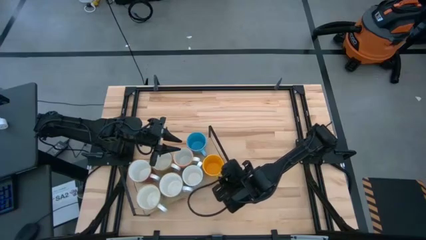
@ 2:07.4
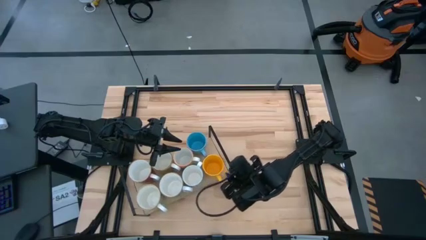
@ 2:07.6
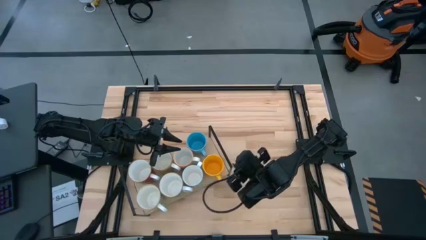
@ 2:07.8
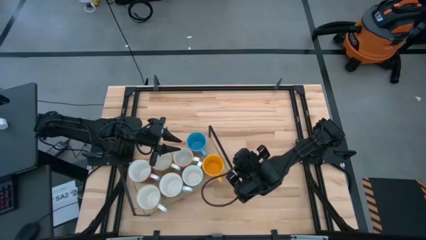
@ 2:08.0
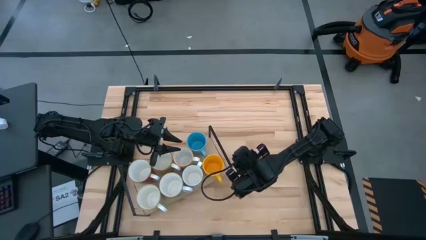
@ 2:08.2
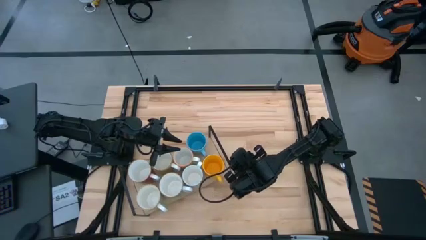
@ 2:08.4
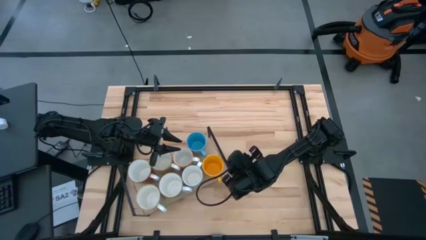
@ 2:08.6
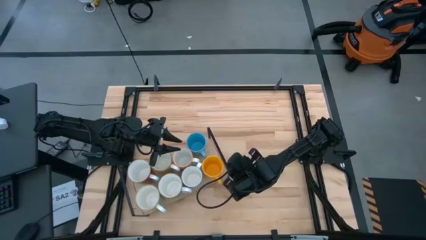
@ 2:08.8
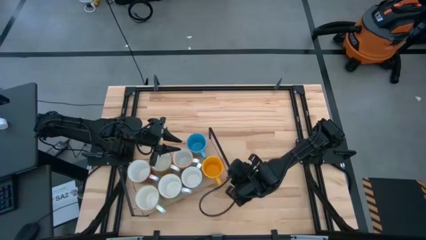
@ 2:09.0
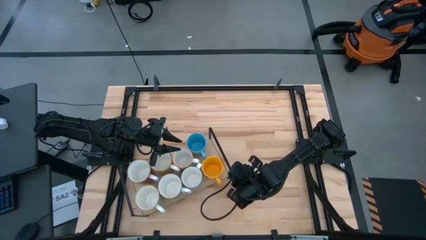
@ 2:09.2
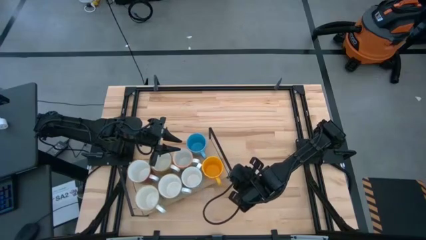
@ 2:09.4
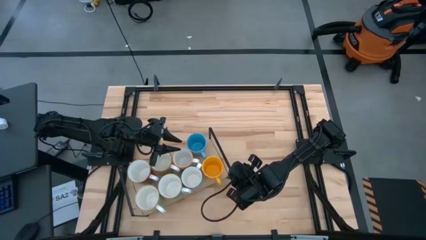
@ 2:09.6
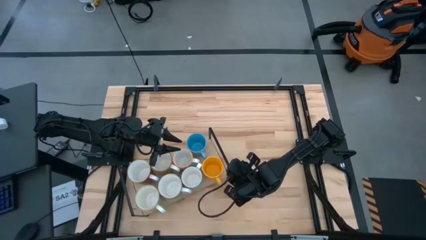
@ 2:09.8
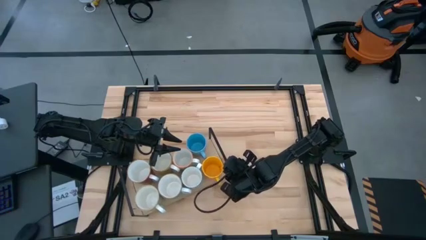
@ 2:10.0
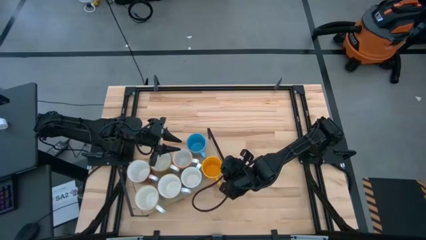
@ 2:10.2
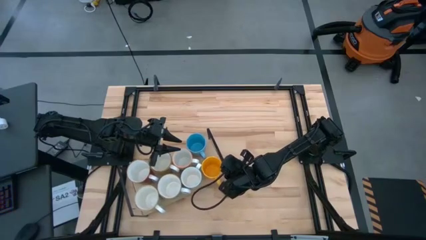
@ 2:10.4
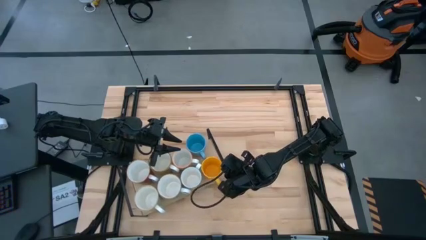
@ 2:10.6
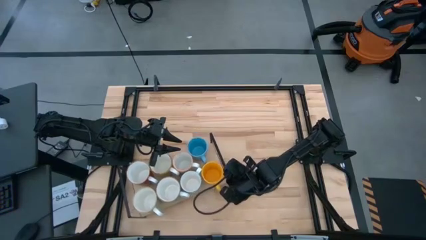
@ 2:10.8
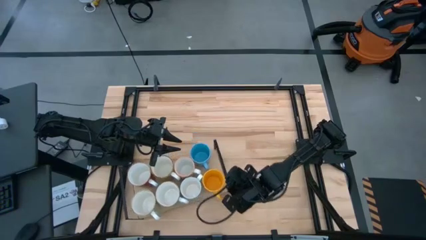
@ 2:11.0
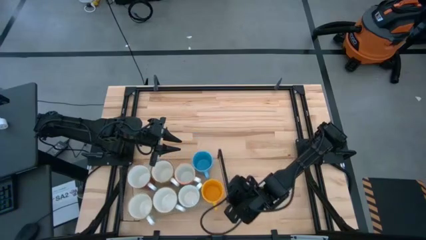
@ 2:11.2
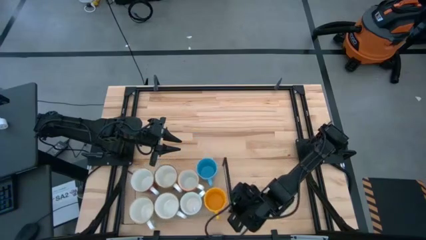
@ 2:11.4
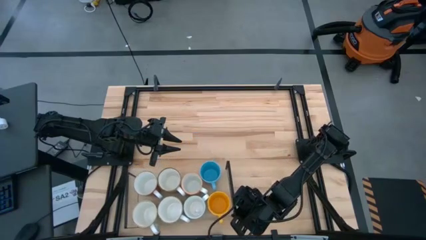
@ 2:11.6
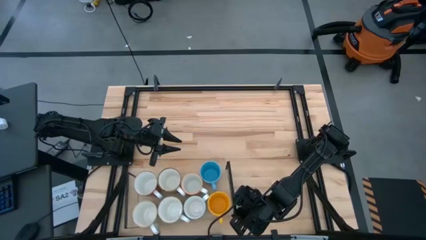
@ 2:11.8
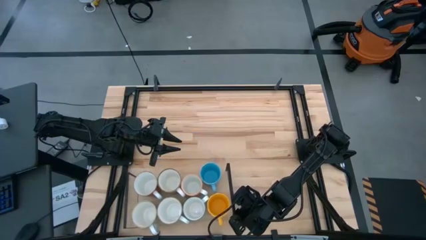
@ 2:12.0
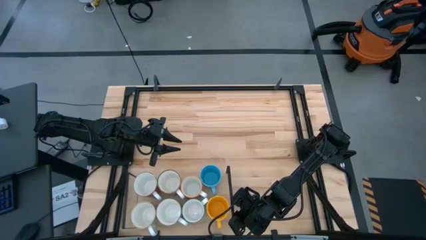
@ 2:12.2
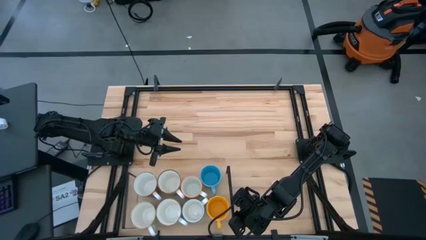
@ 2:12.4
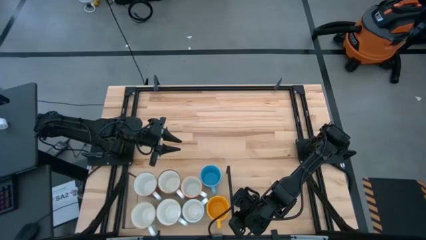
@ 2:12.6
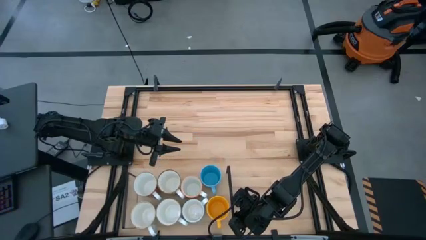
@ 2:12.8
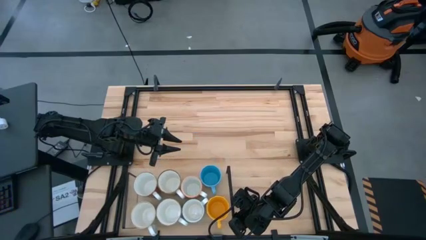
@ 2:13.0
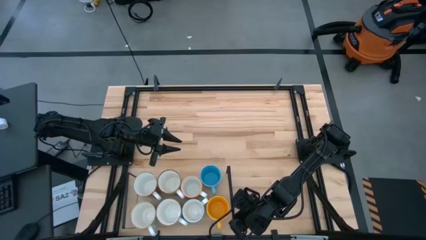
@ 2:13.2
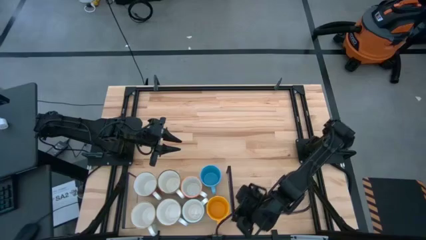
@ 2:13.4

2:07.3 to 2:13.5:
Task: Place coffee mugs
Adjust the shelf

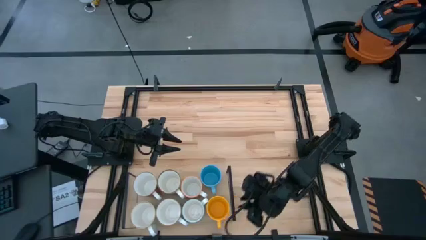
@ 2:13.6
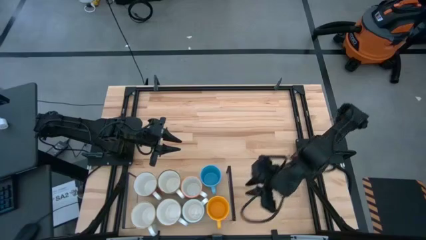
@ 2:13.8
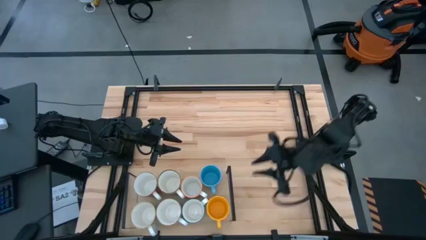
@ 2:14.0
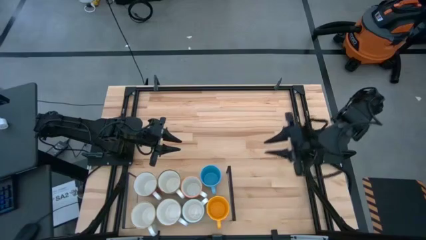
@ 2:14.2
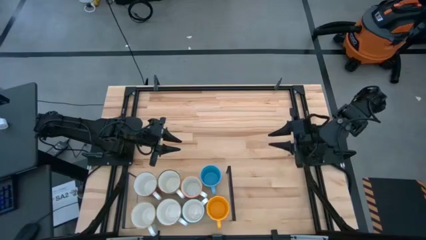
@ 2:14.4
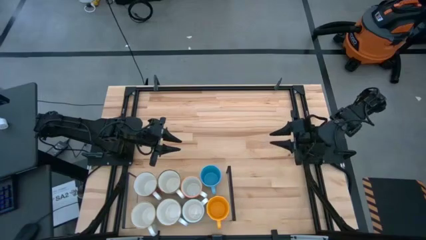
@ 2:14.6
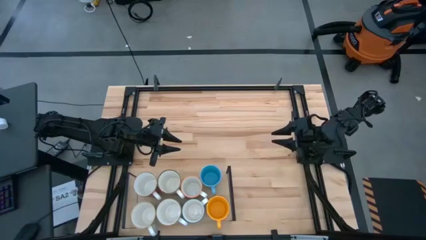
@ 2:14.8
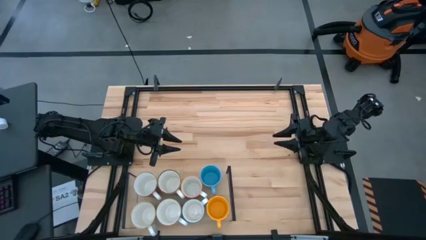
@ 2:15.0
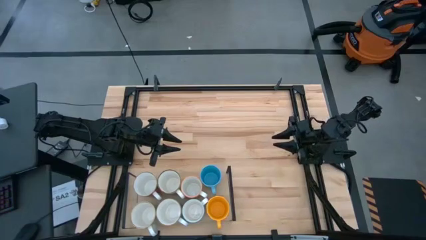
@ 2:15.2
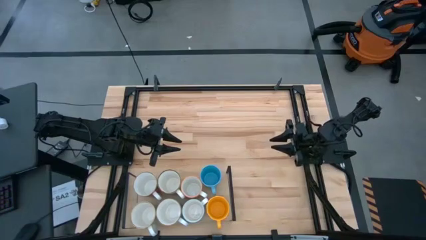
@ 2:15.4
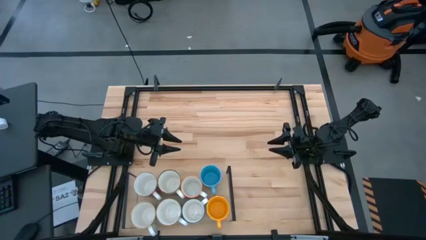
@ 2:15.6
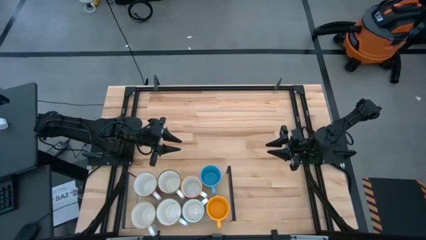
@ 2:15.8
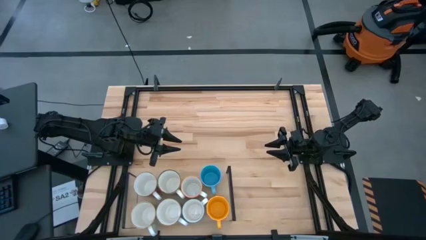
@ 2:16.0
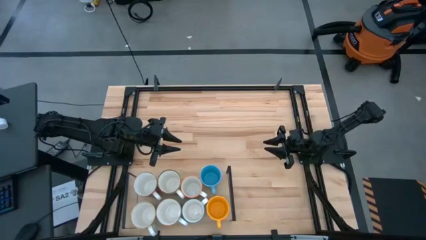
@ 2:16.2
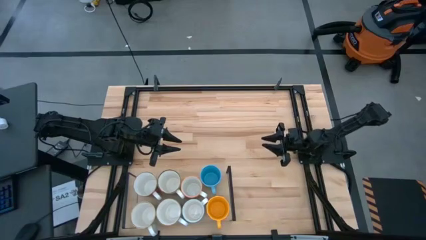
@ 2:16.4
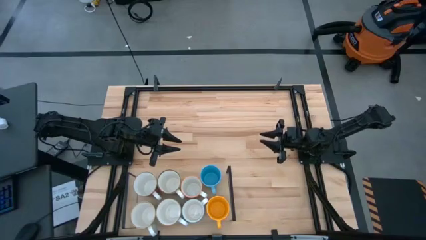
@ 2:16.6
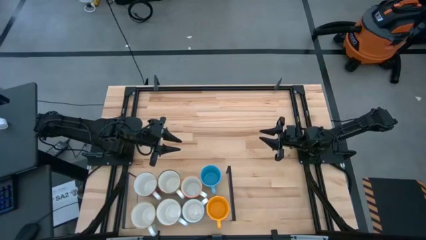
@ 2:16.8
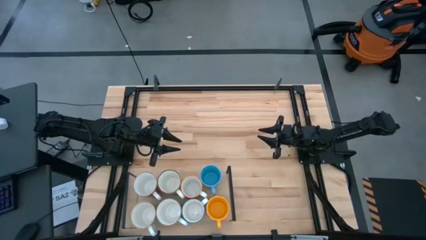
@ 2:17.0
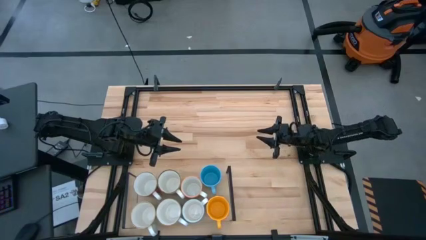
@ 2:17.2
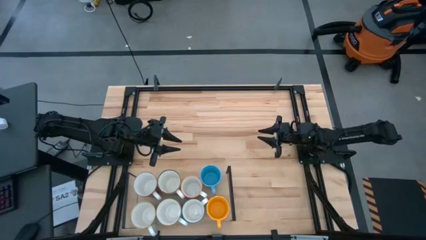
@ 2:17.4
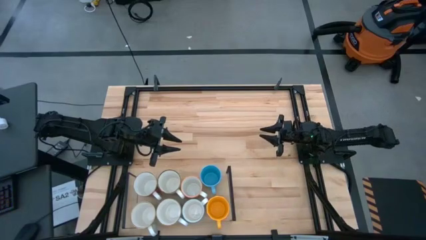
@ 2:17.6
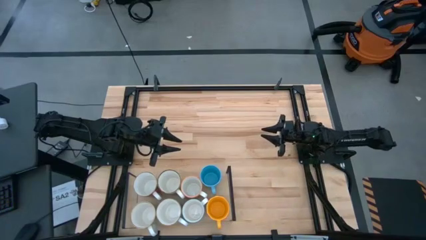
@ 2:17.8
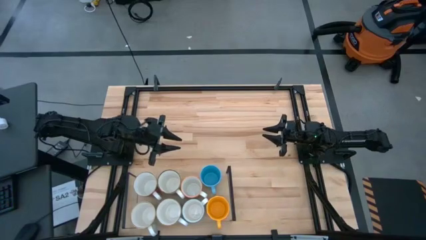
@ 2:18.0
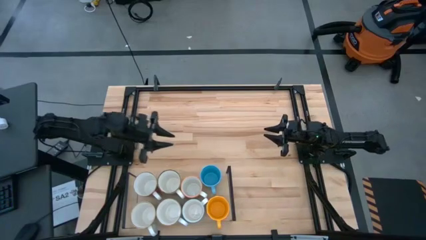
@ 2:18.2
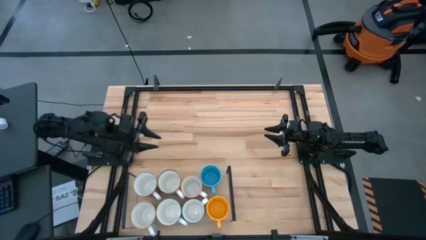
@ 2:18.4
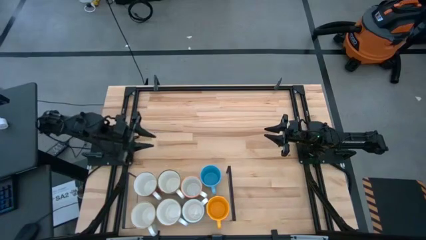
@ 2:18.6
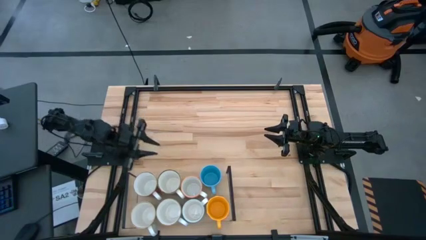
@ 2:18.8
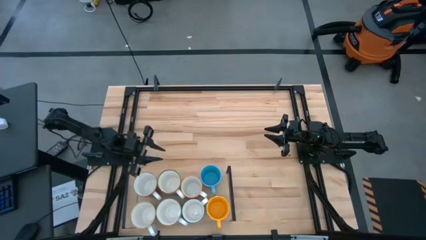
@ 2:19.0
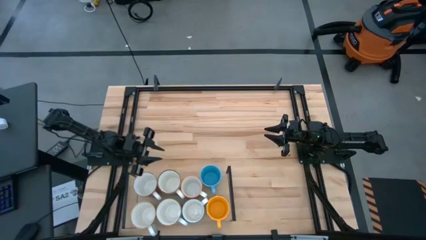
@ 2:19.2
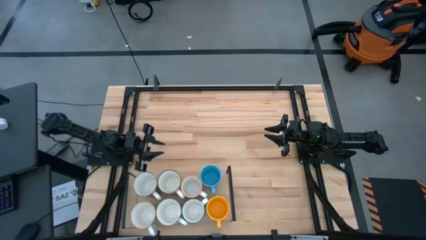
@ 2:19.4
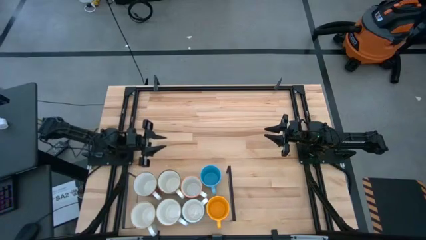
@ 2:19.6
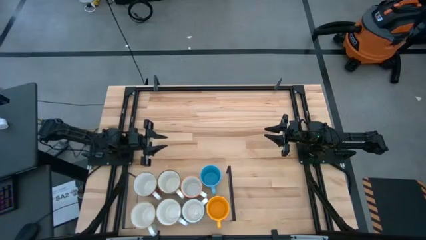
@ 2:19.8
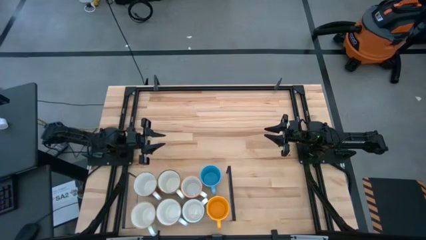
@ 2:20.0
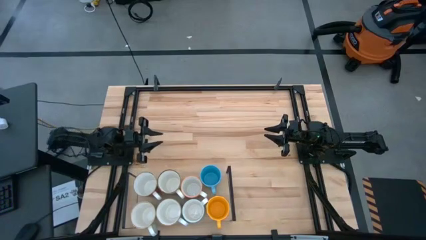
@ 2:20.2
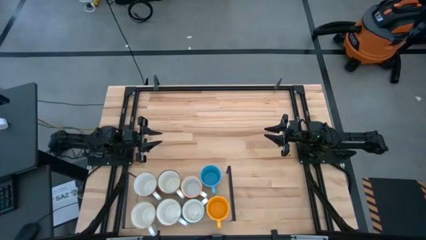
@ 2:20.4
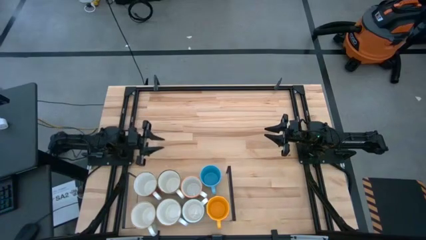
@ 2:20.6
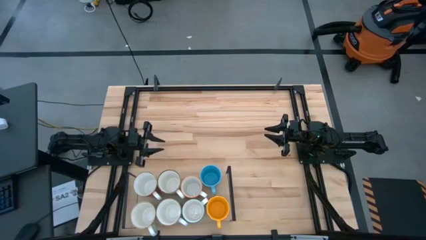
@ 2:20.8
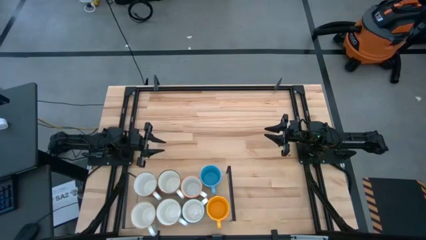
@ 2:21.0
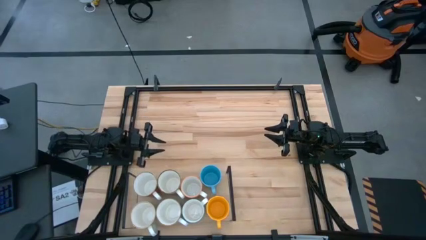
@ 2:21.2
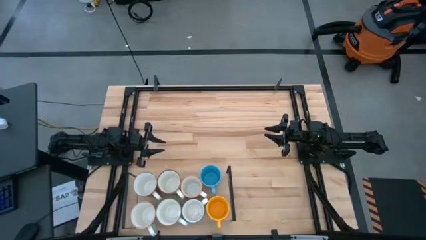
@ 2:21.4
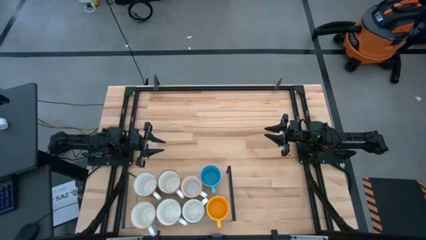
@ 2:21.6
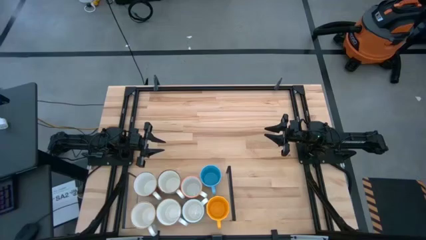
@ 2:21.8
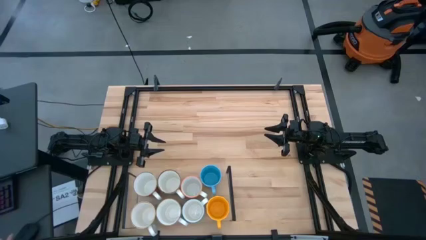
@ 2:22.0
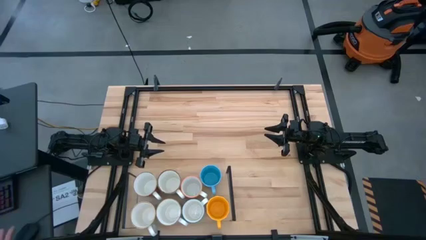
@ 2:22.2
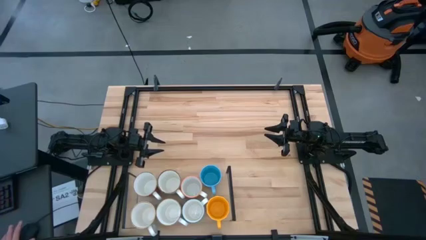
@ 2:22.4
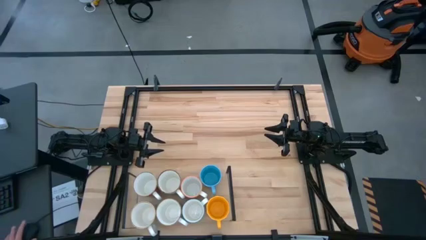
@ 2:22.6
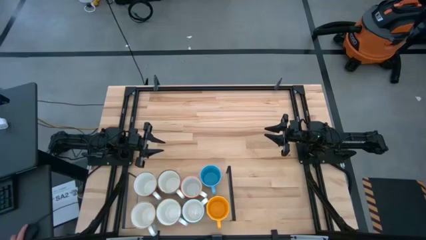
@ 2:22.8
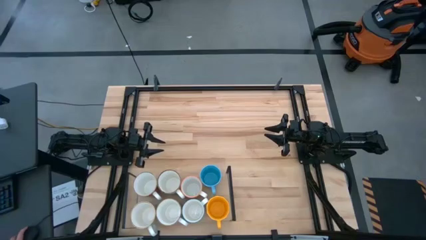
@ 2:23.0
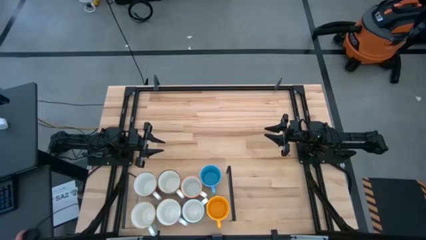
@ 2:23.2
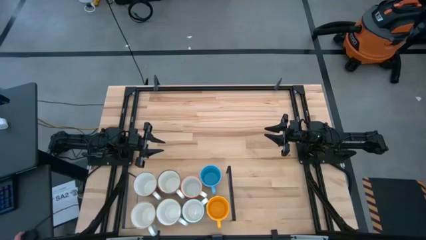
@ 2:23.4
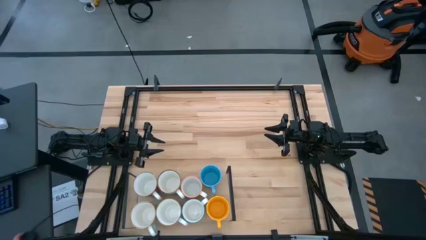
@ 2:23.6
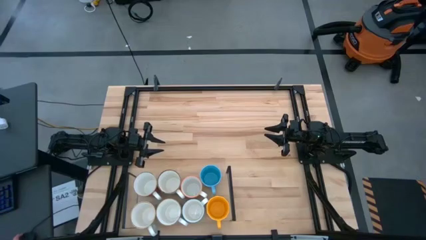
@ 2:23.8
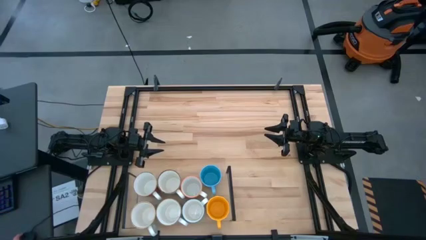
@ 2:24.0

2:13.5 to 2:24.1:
Return to Home Position
